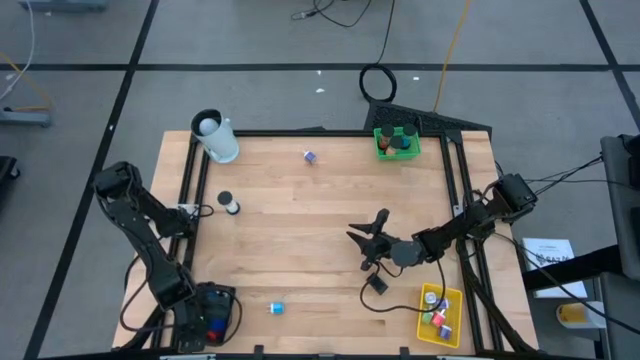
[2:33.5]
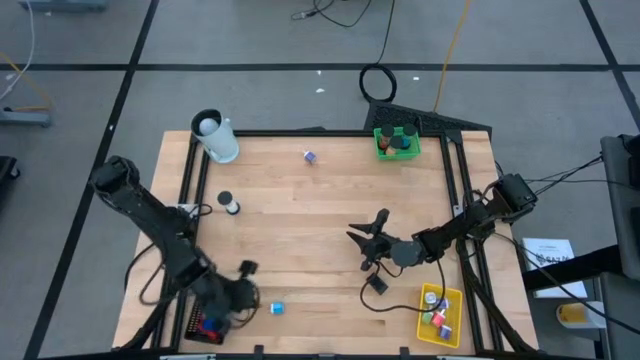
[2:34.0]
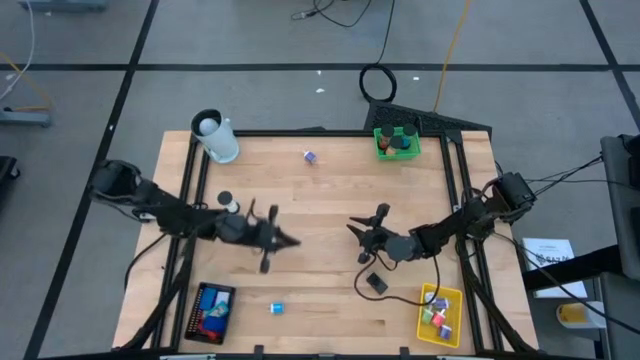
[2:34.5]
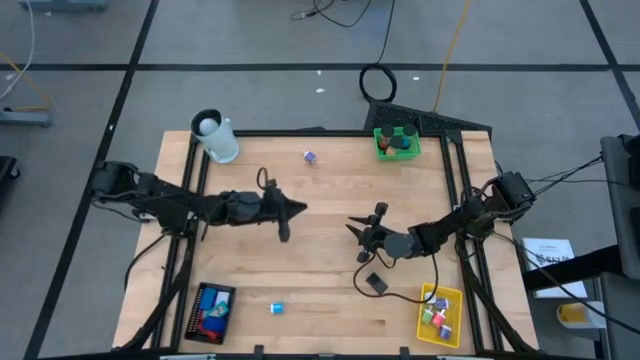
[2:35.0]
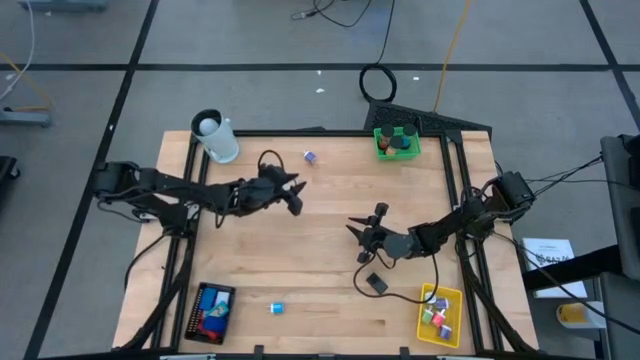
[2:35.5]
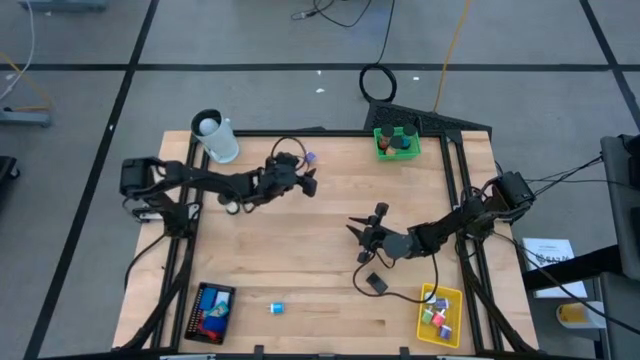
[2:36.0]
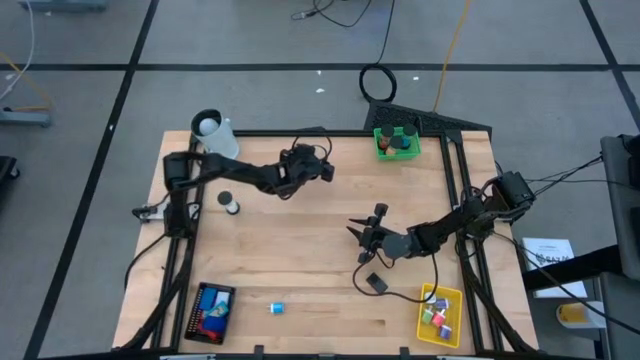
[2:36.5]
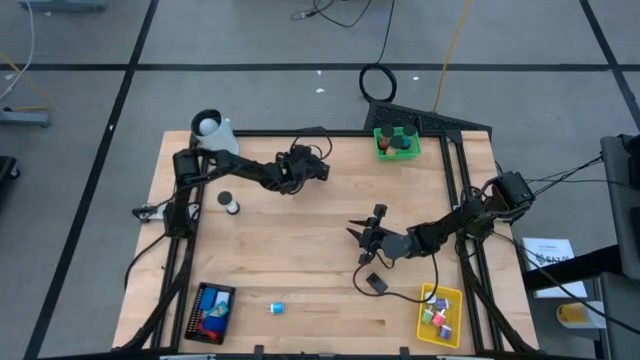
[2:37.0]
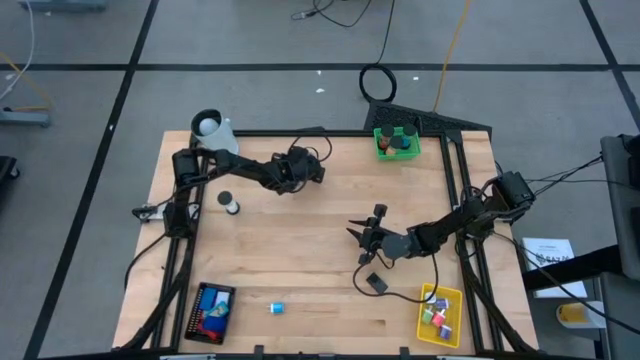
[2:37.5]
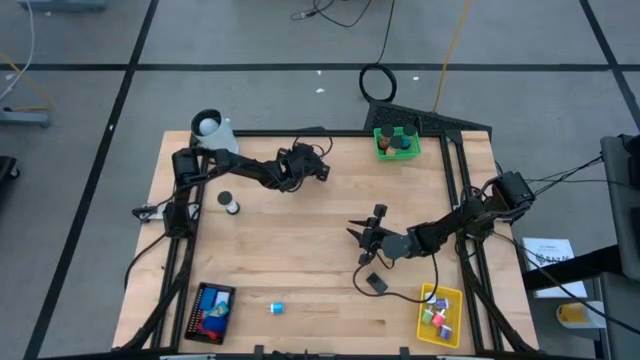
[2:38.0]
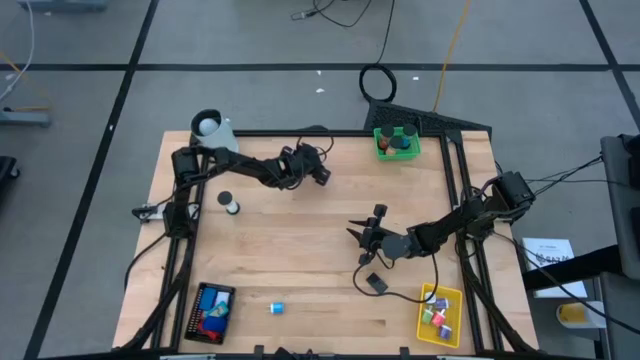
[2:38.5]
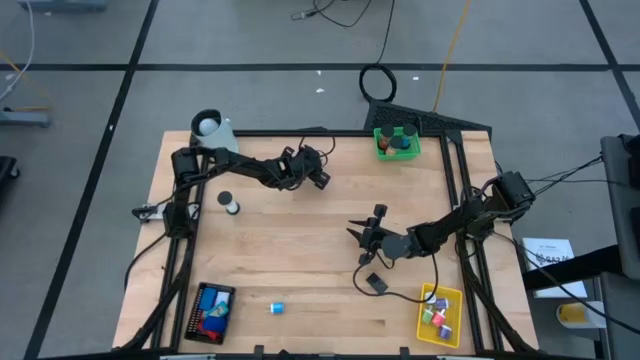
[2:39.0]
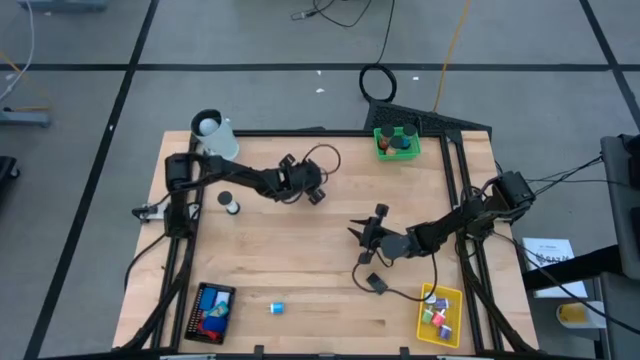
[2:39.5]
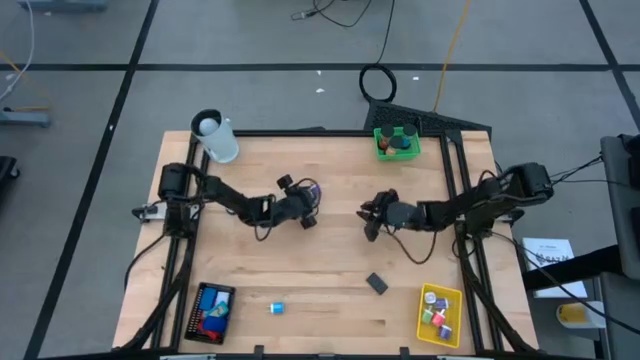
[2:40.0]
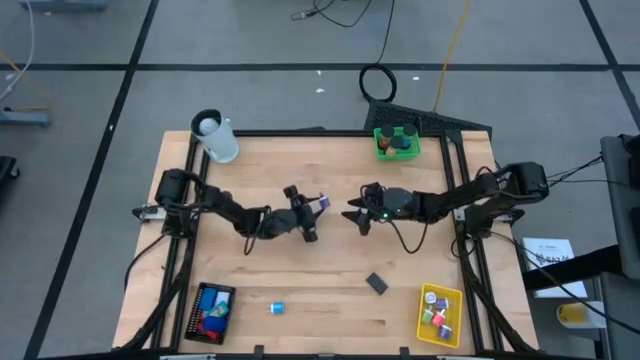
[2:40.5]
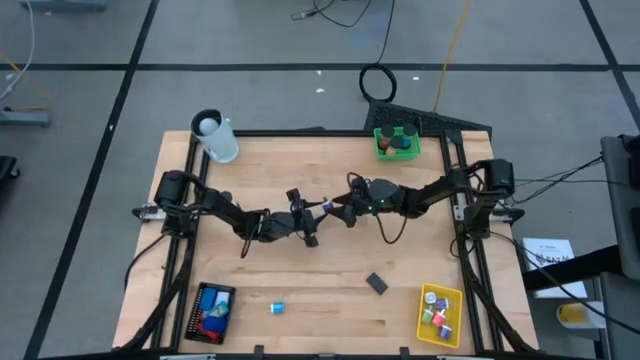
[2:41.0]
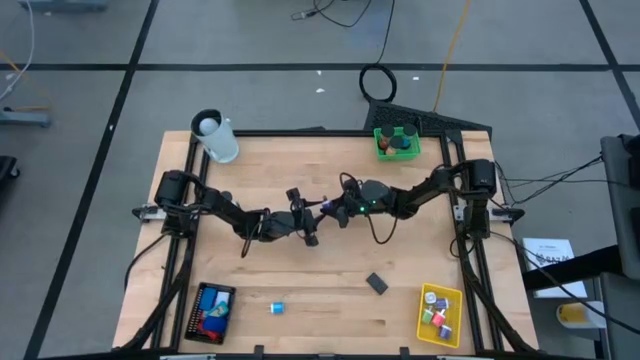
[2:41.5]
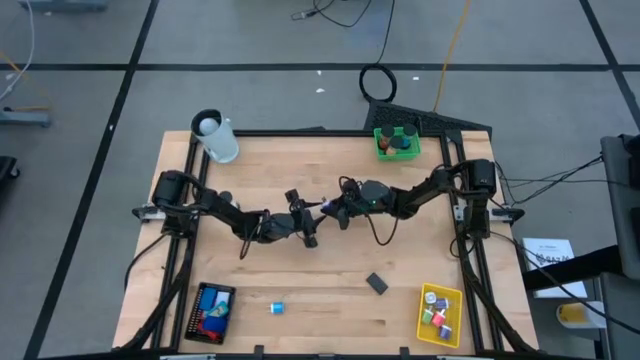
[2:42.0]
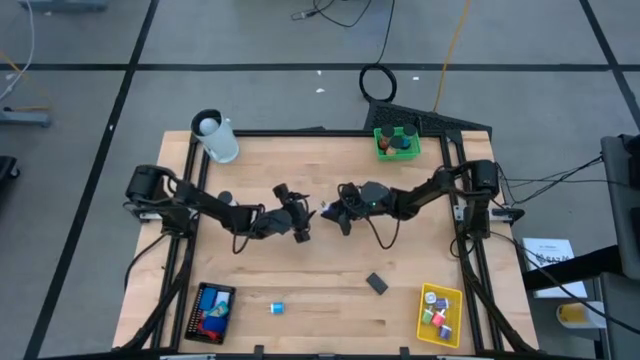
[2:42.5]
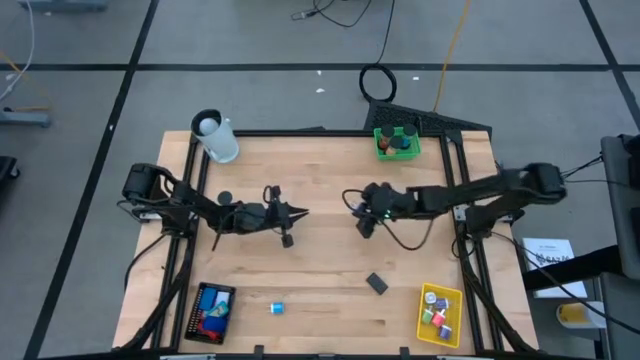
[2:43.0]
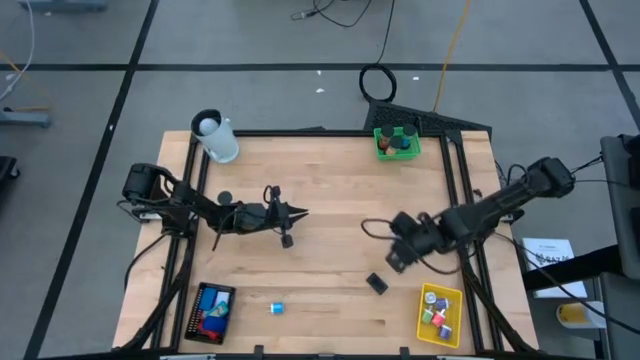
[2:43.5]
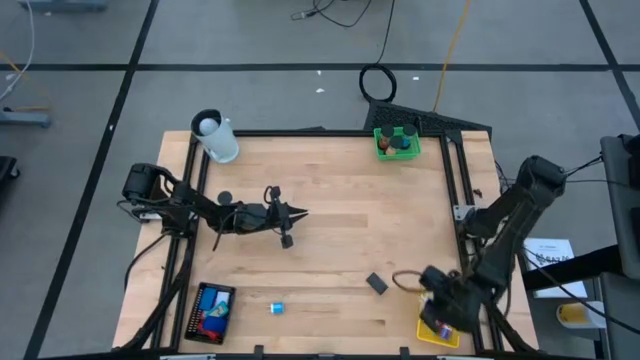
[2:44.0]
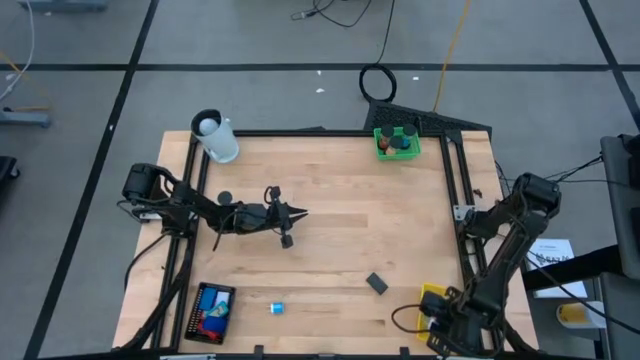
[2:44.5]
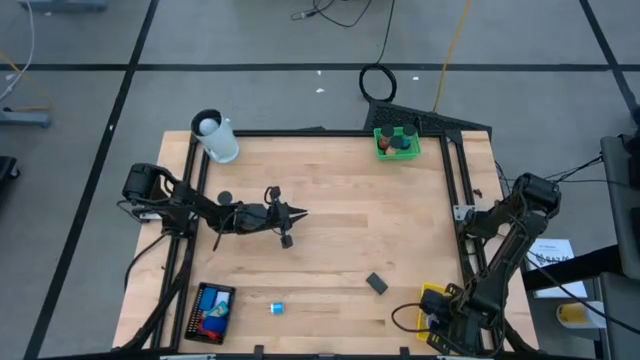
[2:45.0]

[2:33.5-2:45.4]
Task: Pick & Place Office items
Put the purple charger adapter into the yellow bin

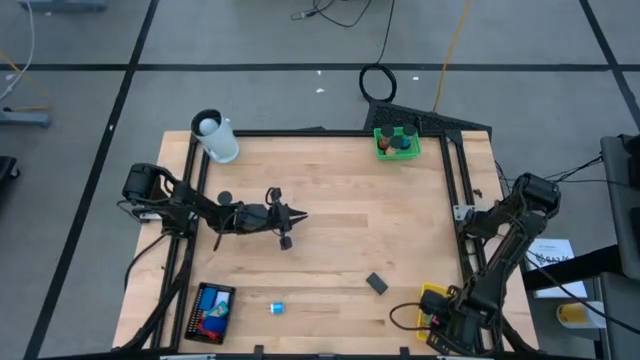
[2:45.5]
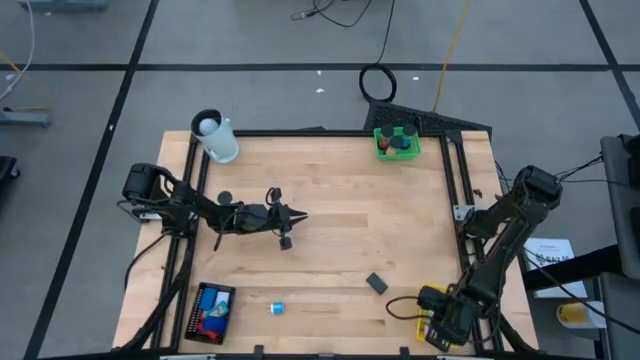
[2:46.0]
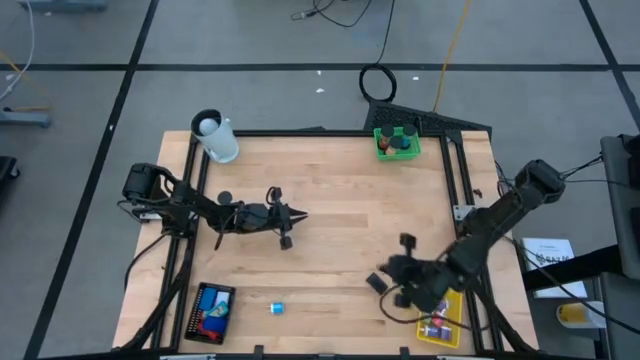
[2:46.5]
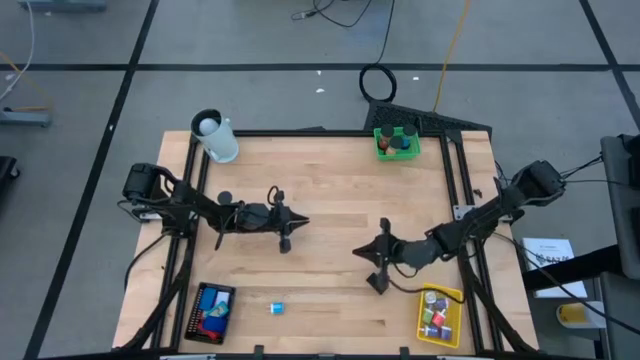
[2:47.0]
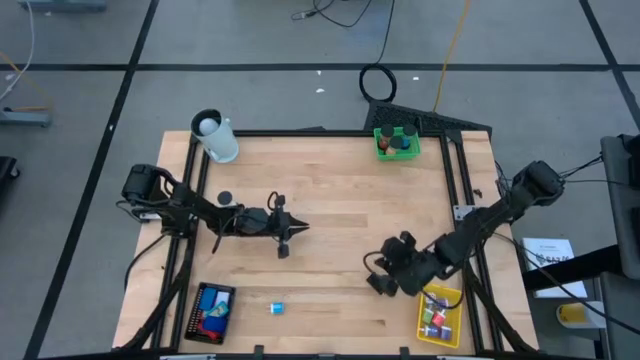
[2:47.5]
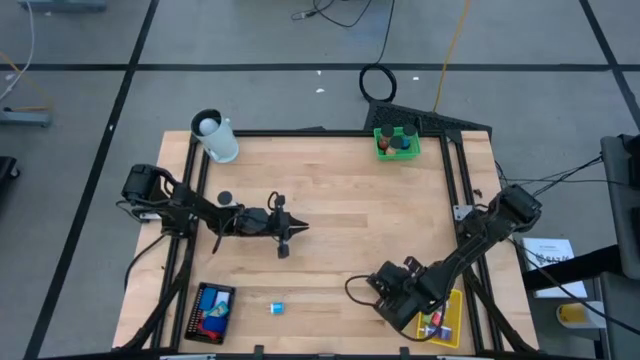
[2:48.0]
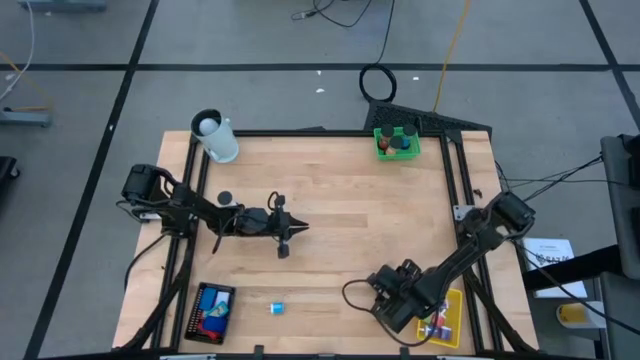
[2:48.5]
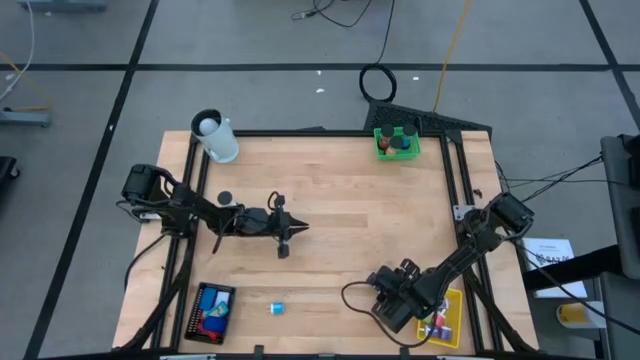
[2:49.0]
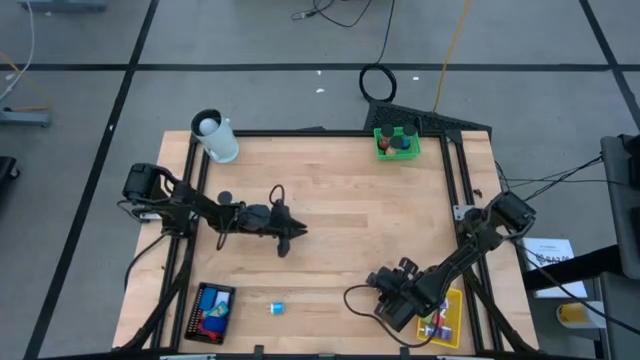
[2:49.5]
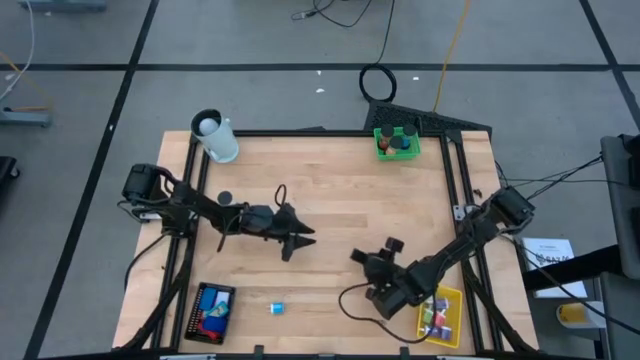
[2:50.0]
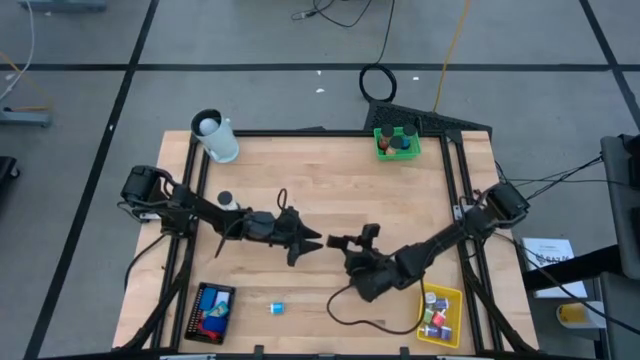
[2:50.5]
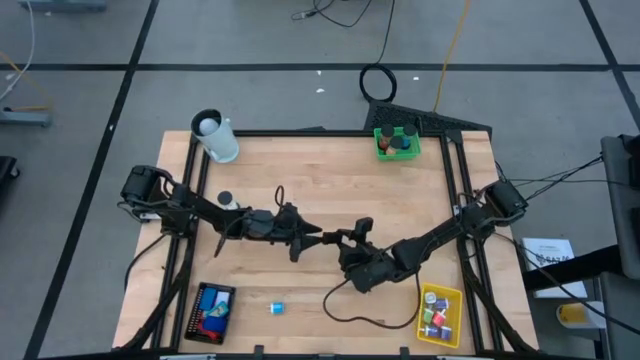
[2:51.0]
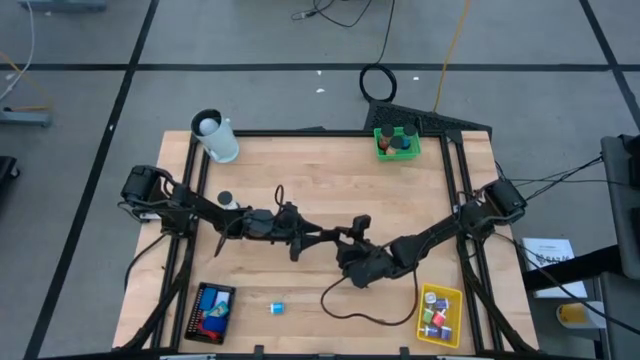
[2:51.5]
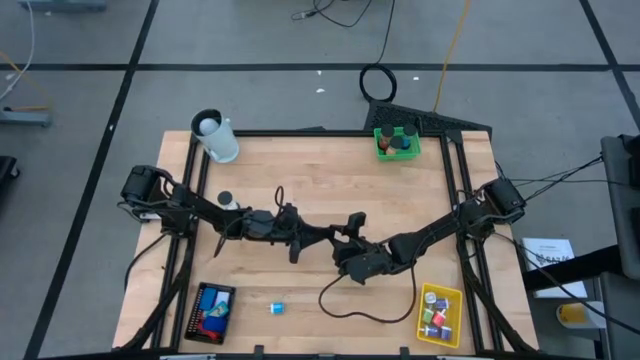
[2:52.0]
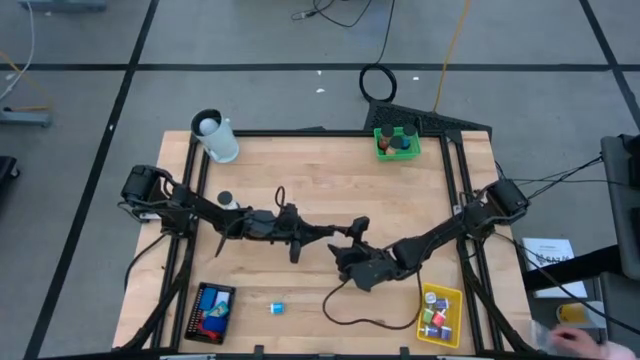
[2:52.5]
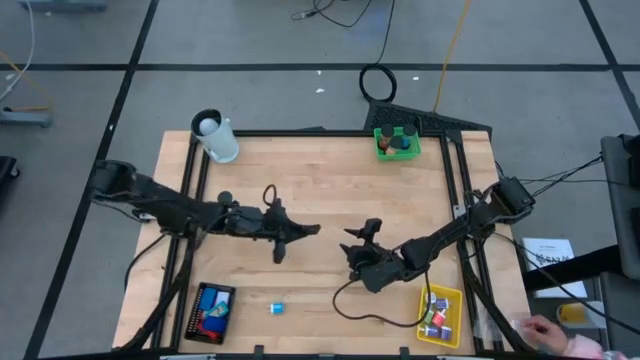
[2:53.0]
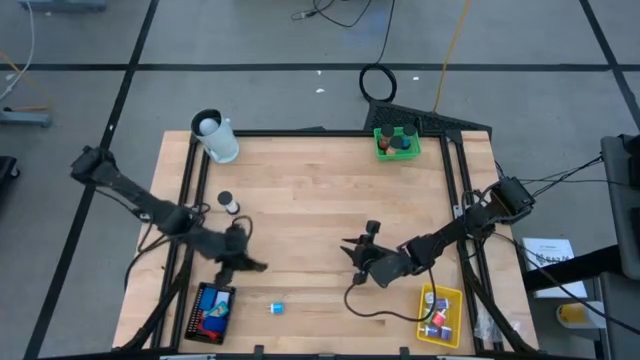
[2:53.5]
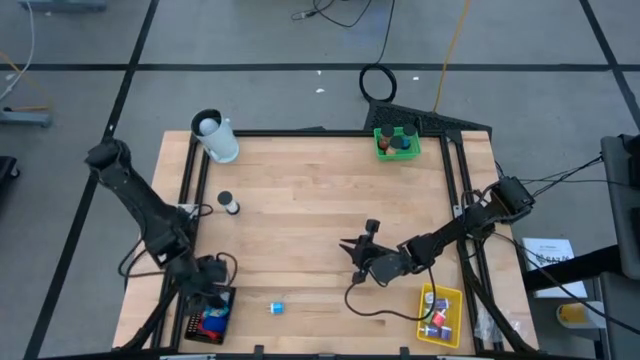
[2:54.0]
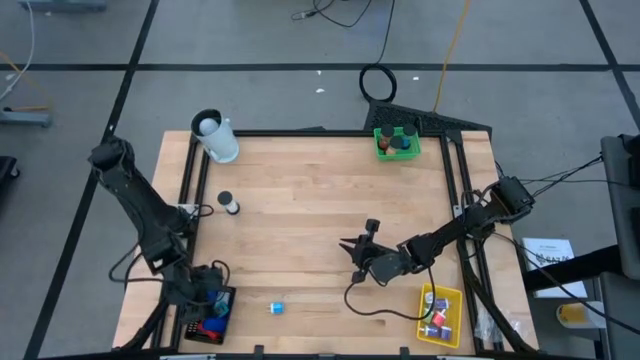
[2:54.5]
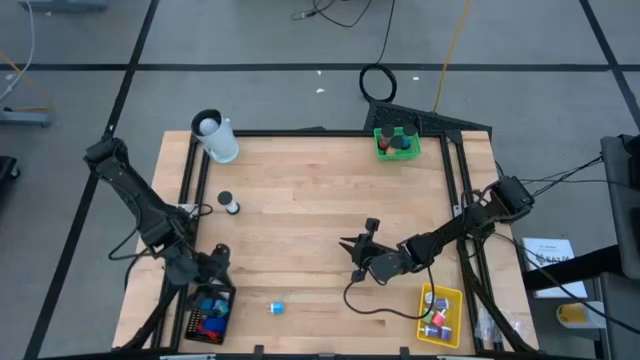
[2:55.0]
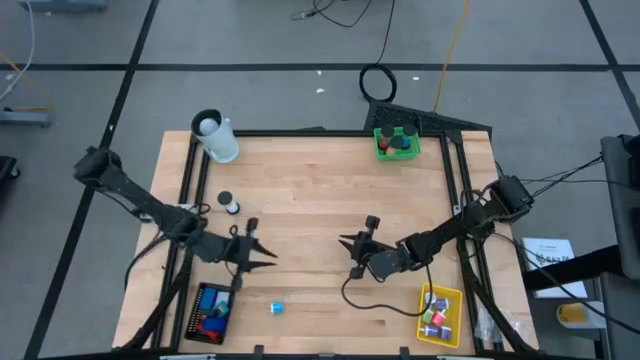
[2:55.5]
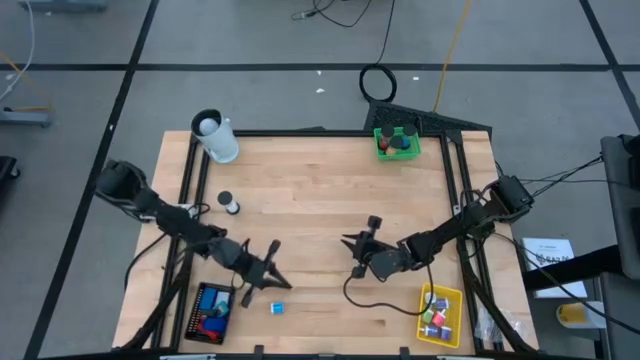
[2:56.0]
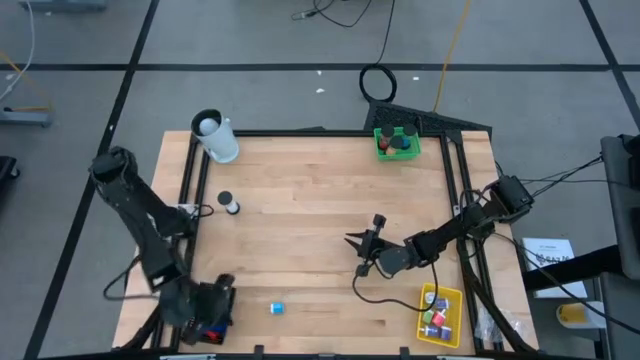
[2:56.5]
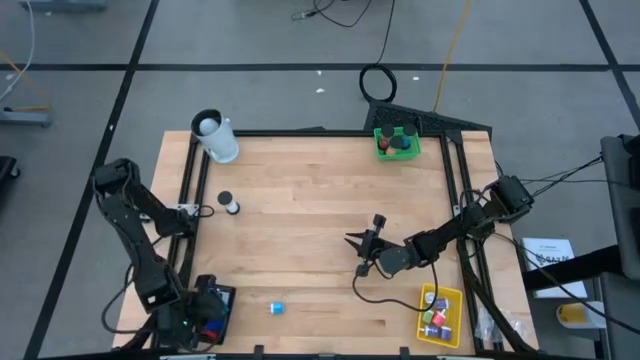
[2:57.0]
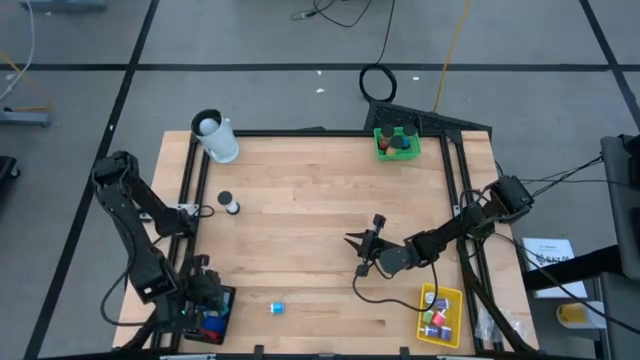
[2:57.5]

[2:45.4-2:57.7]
Put the black digital clock into the black bin
